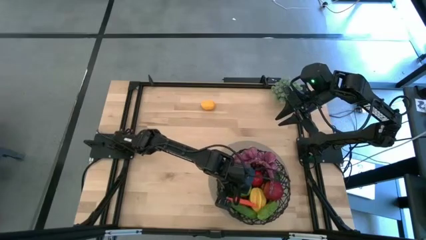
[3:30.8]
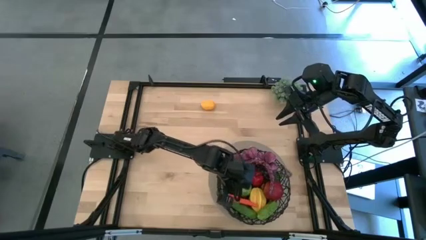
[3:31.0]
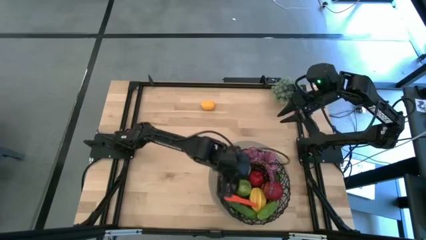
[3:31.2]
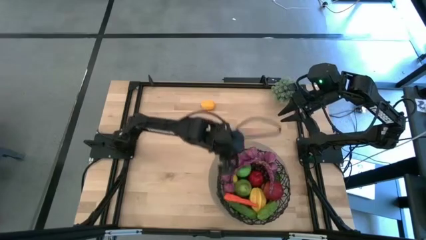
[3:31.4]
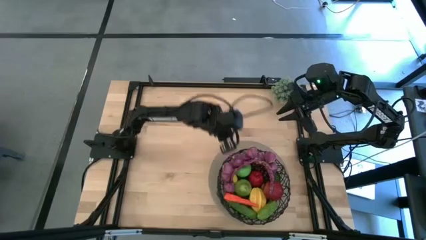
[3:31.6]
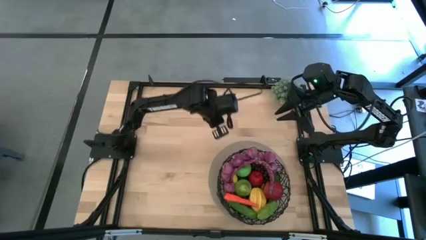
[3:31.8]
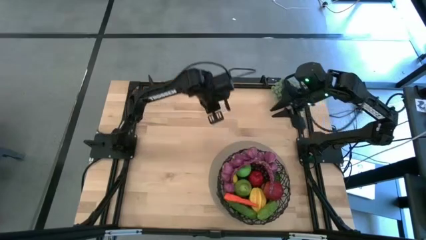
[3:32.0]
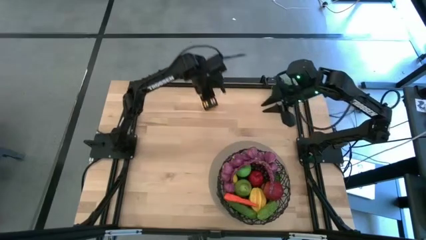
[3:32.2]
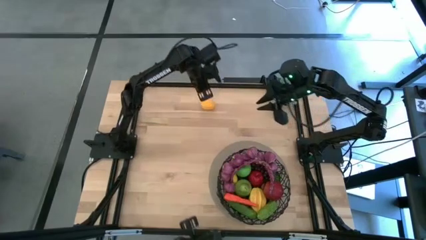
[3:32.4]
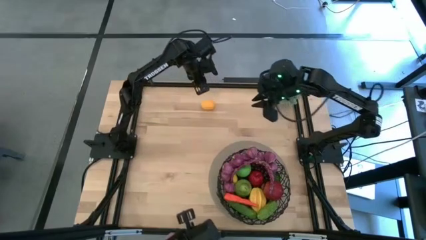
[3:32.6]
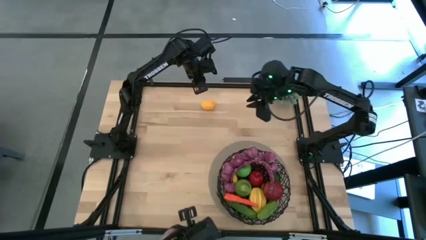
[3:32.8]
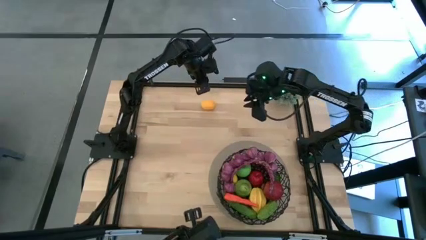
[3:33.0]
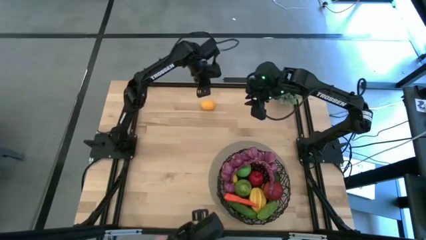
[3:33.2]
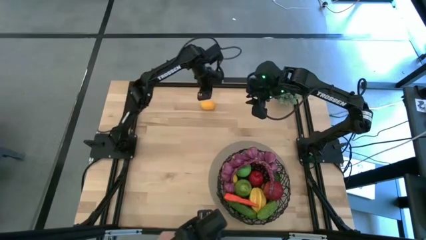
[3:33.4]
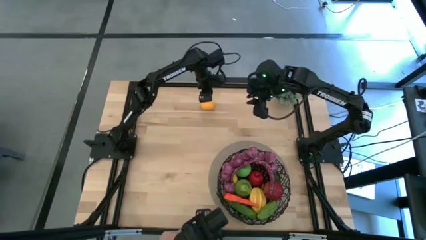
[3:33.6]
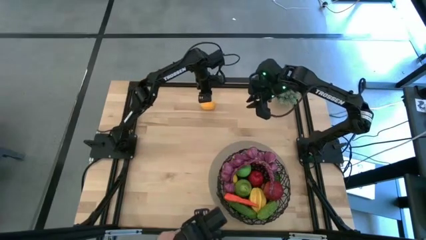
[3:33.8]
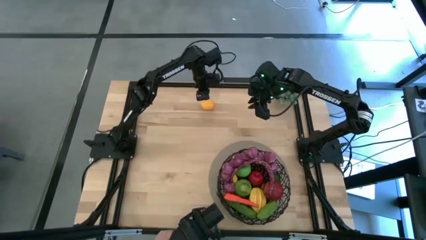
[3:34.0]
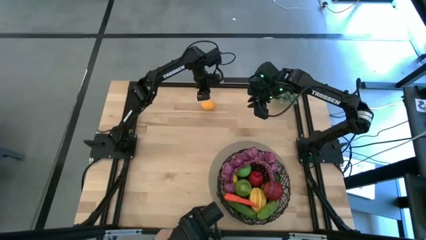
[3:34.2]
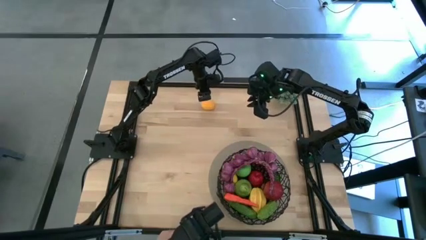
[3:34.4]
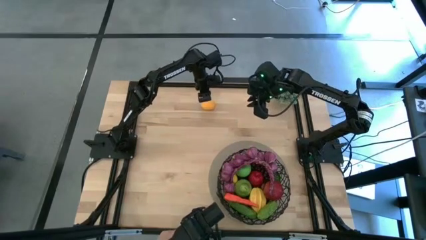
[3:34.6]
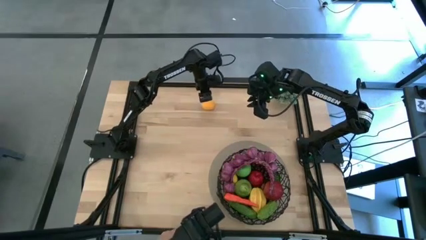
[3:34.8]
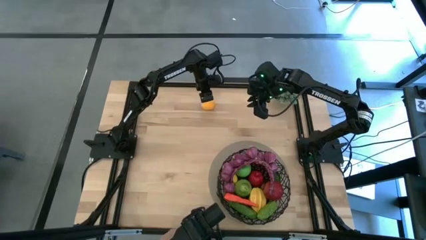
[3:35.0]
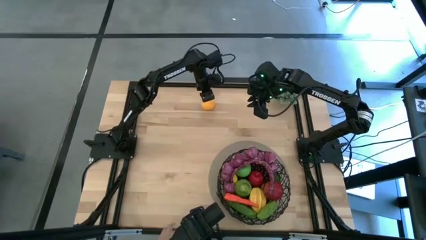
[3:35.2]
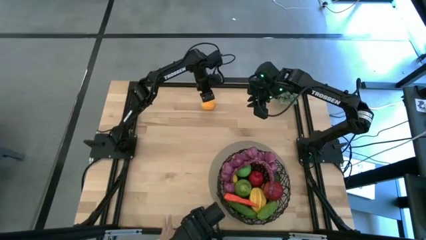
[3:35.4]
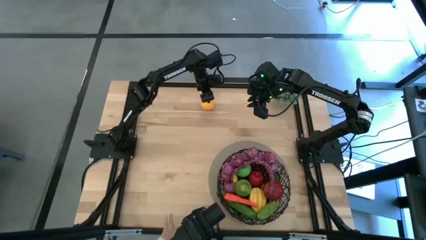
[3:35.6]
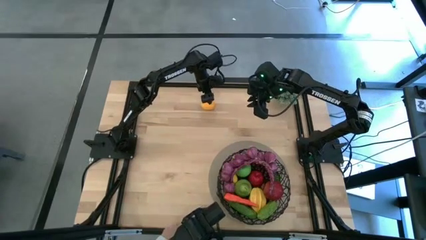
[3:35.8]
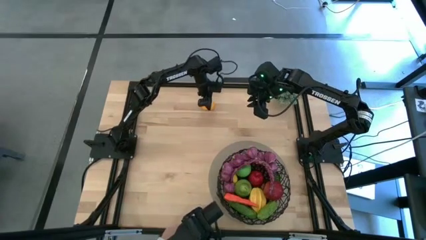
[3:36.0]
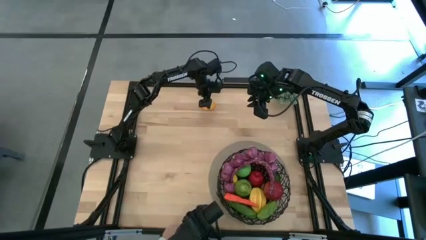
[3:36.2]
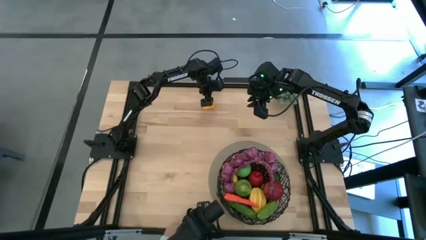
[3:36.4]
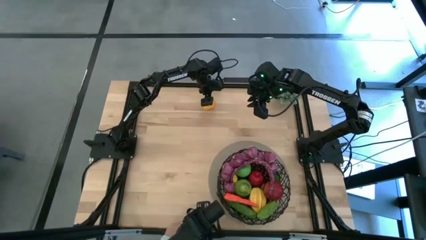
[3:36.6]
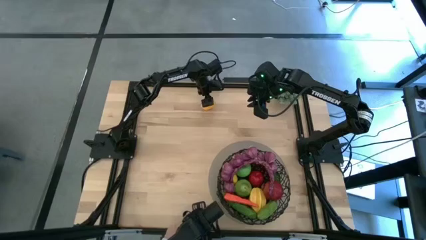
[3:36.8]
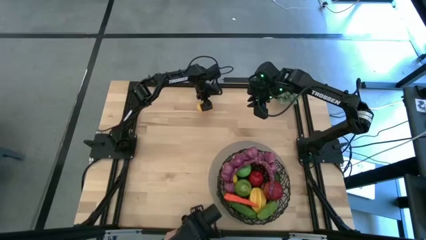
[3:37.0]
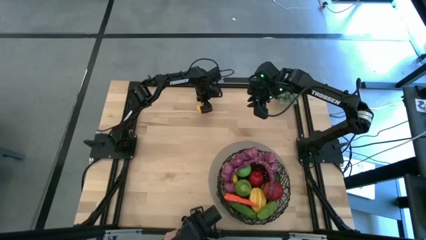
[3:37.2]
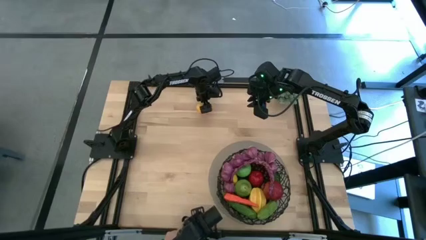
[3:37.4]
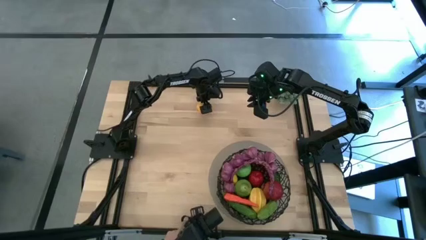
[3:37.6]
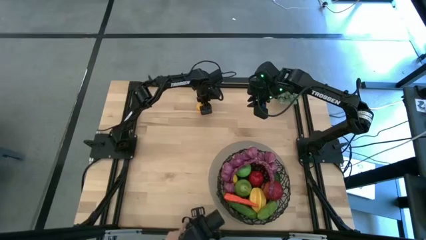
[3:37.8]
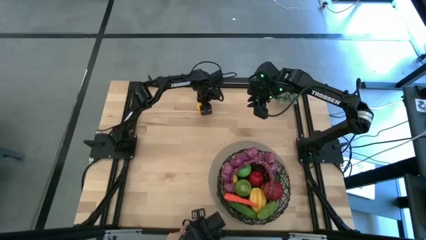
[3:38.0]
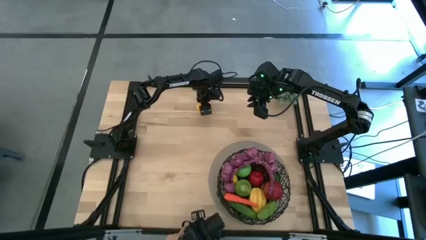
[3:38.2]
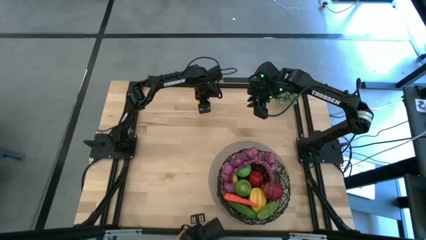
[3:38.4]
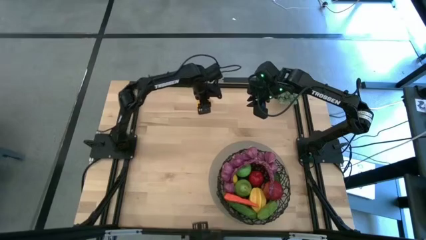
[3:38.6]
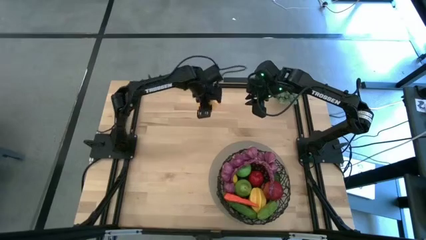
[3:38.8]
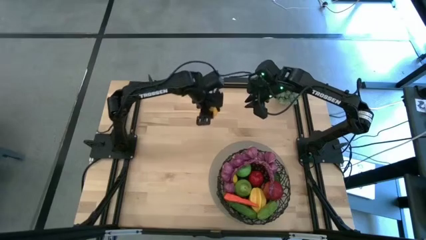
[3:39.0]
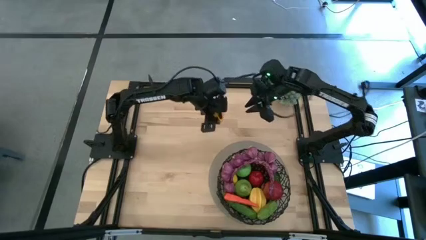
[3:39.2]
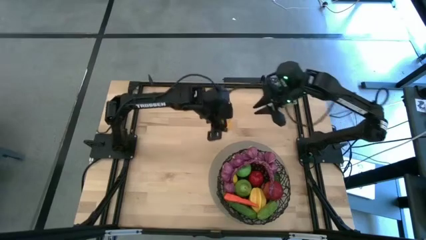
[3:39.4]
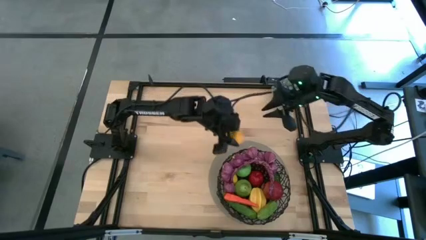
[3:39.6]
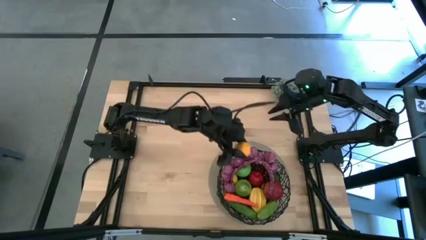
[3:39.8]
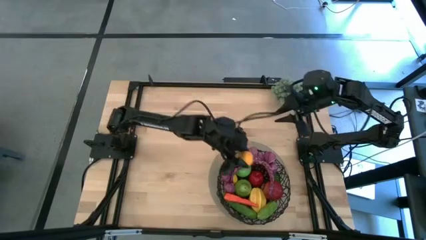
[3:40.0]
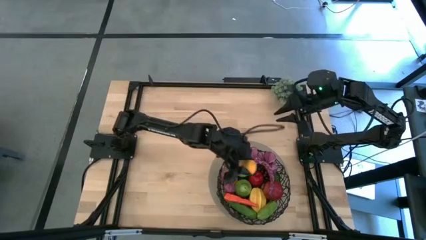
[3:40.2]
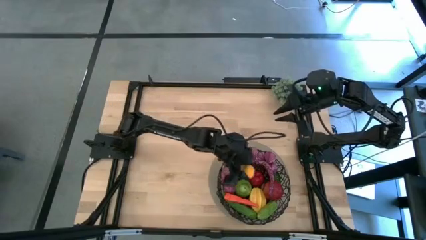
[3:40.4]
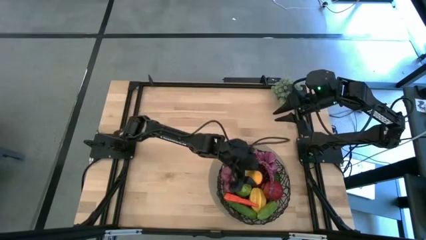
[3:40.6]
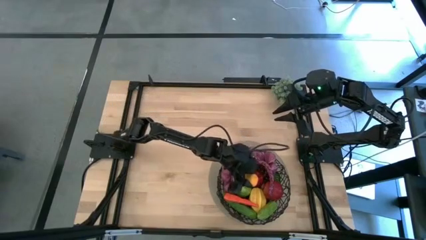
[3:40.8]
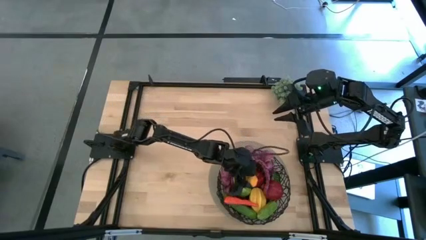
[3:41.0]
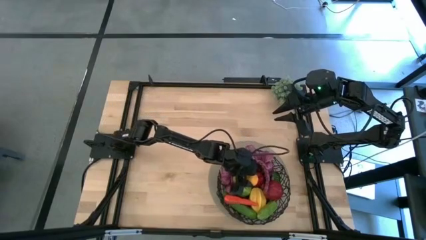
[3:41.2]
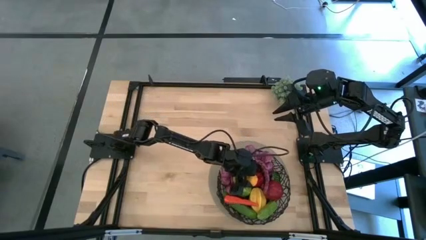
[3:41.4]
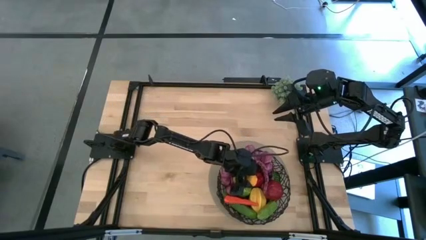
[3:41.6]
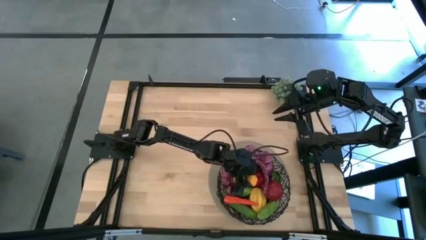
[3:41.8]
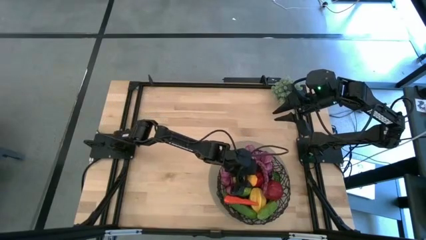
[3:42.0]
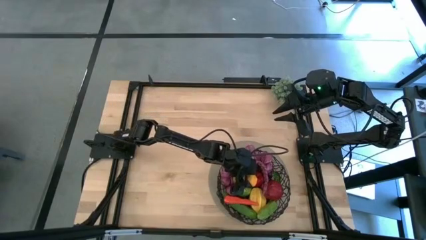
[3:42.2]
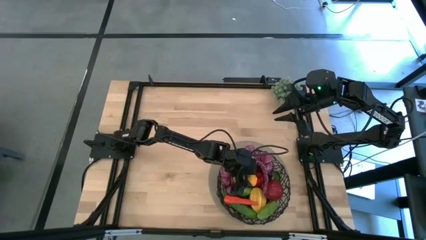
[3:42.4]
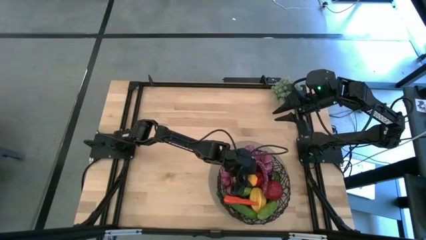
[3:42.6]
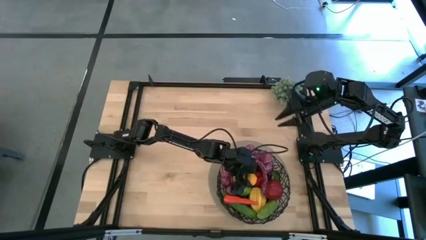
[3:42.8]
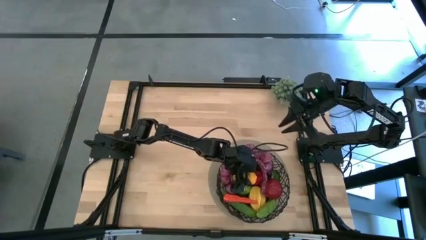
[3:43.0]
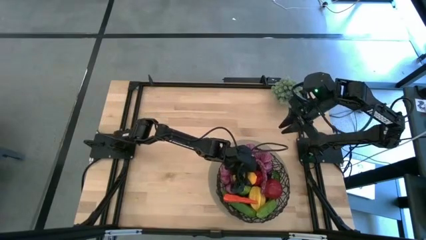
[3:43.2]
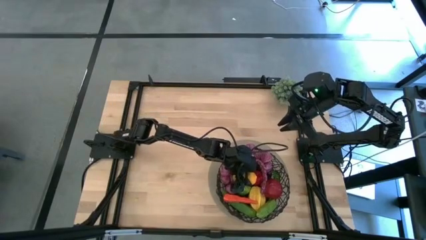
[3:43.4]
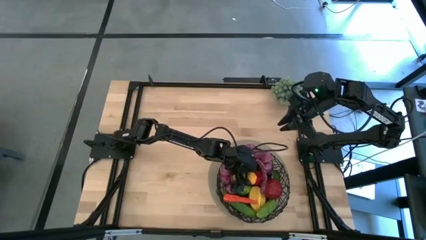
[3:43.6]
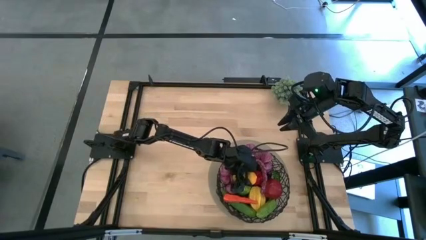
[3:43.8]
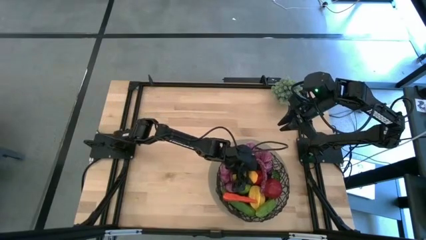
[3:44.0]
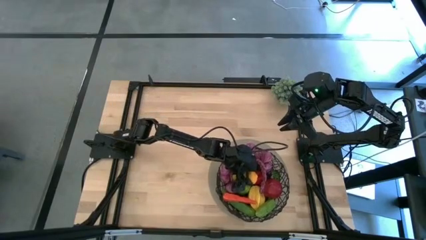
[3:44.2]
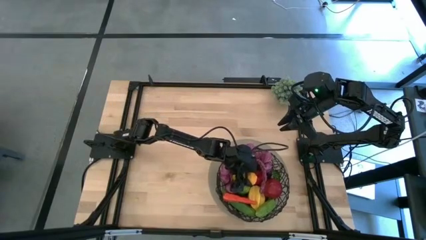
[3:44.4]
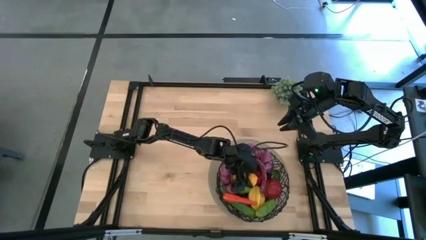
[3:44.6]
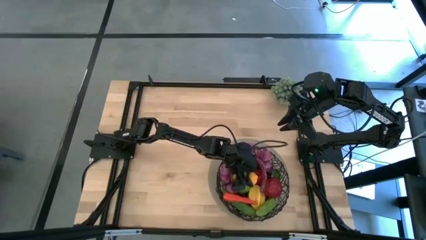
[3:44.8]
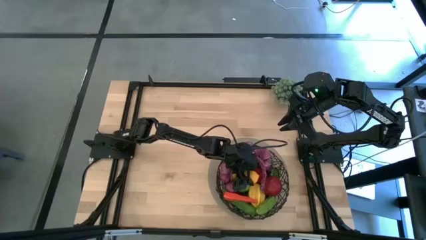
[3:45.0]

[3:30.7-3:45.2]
Task: Build produce basket
Put the yellow lemon into the wire basket

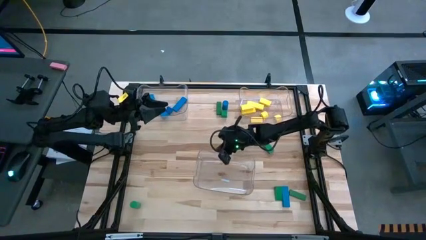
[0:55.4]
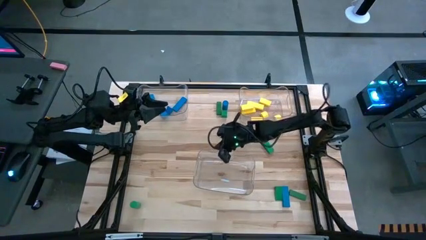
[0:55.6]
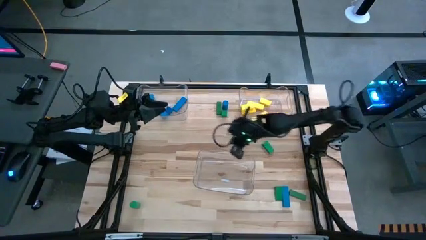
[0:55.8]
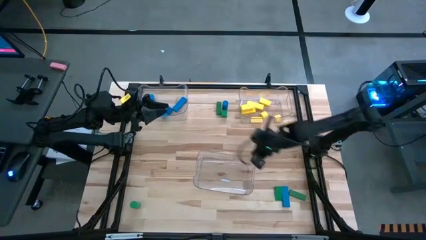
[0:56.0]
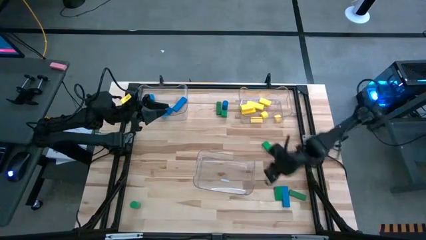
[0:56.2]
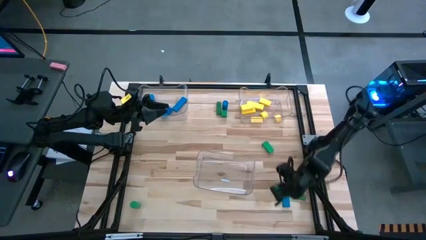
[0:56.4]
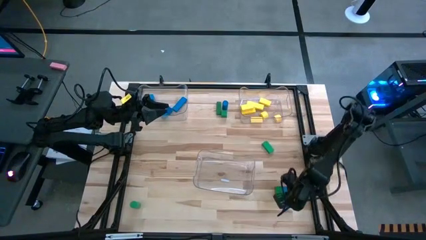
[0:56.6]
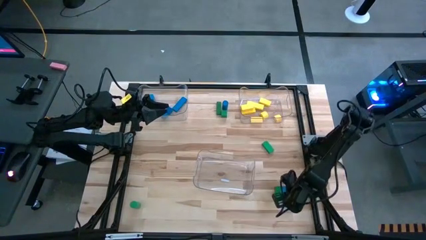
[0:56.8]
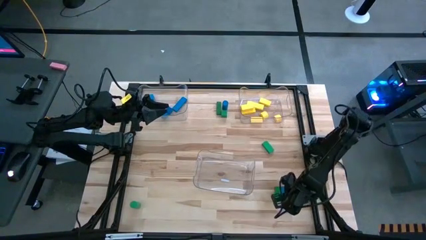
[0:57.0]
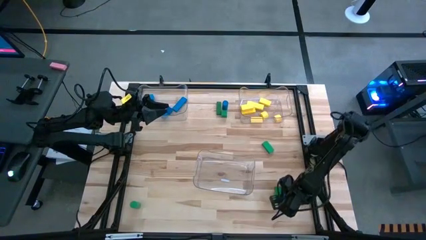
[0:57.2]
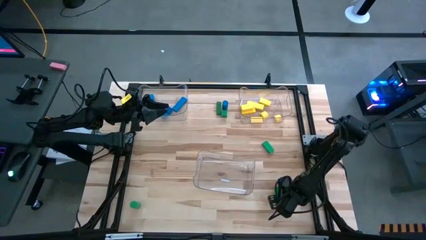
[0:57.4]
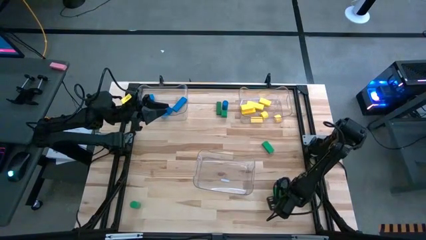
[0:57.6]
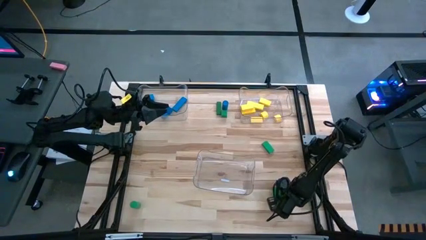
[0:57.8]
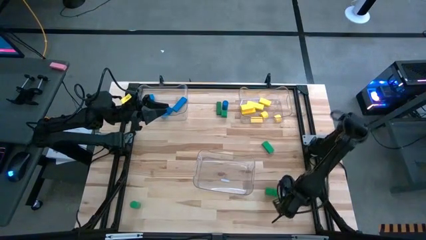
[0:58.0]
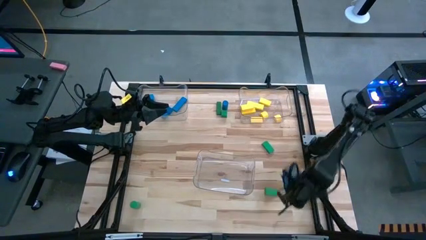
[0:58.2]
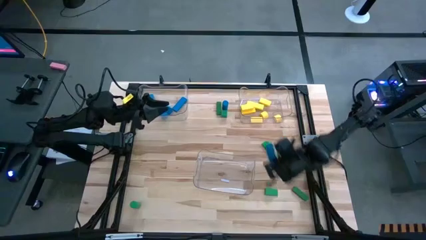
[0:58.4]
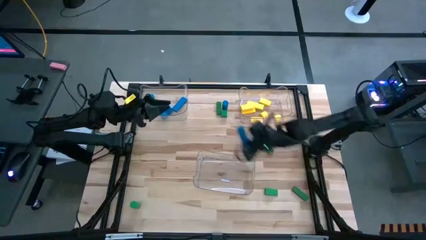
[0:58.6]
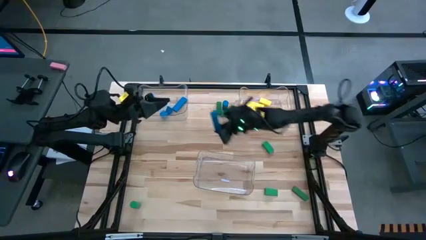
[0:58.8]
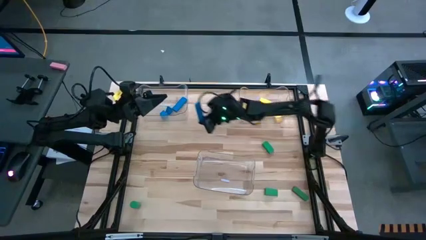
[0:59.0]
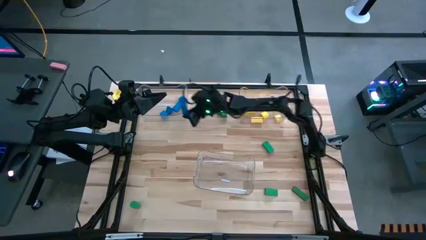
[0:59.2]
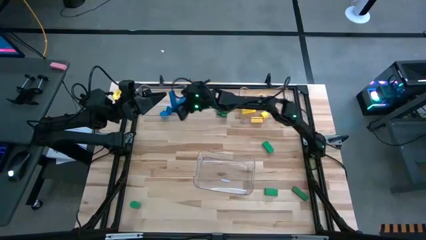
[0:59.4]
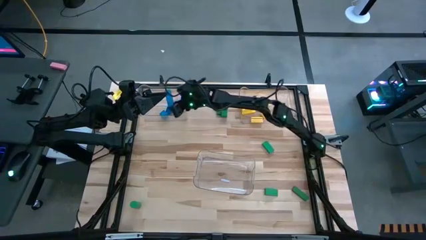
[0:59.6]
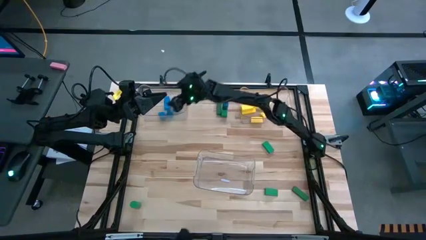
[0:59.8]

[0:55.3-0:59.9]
Task: Sort blocks
Put the blue block into the left transparent bin
